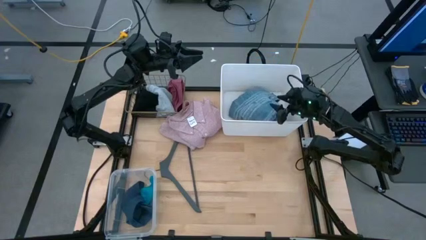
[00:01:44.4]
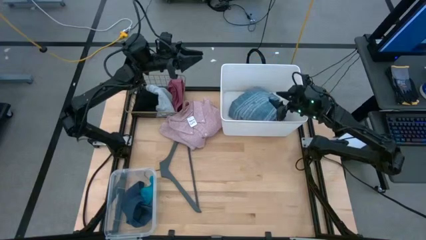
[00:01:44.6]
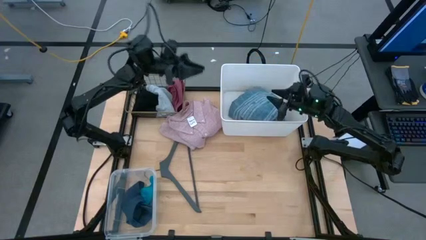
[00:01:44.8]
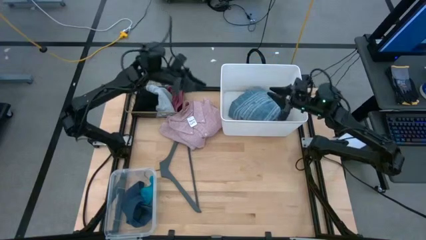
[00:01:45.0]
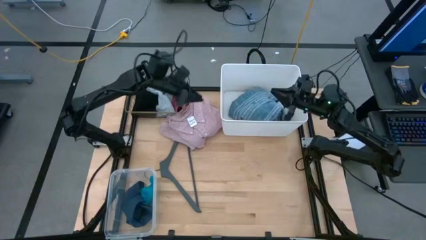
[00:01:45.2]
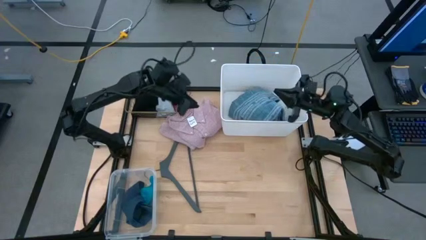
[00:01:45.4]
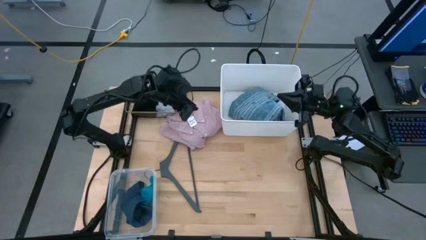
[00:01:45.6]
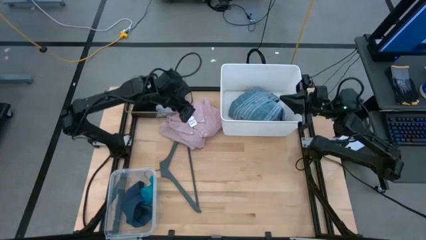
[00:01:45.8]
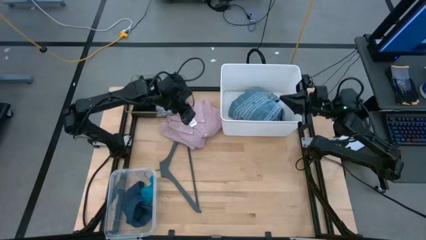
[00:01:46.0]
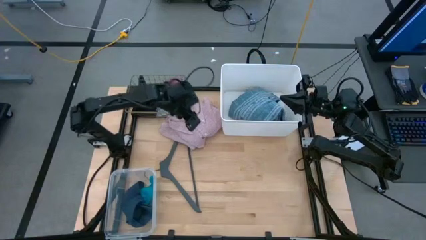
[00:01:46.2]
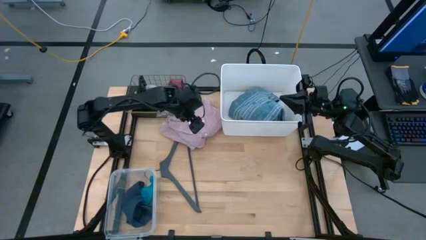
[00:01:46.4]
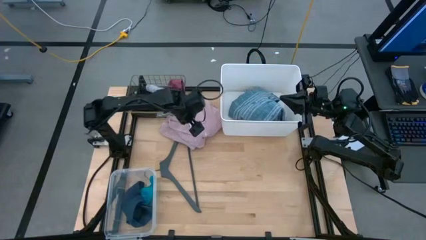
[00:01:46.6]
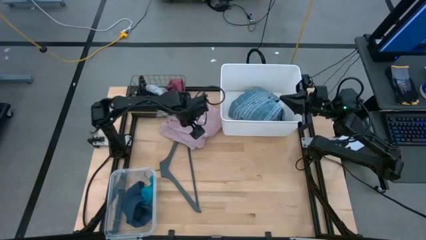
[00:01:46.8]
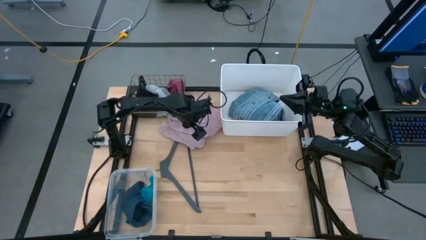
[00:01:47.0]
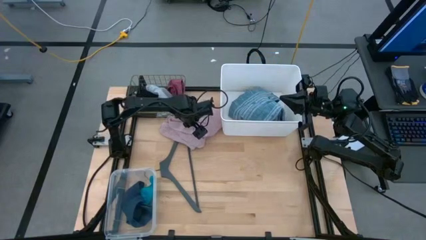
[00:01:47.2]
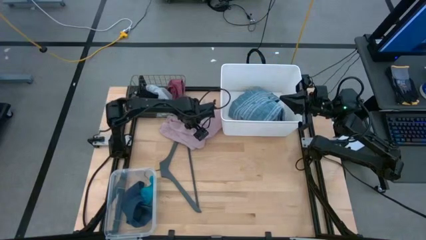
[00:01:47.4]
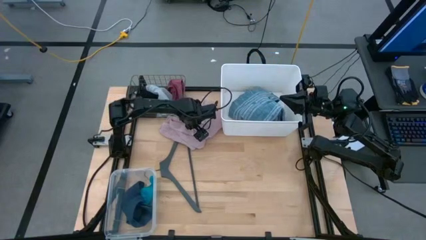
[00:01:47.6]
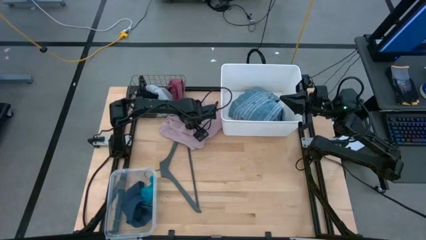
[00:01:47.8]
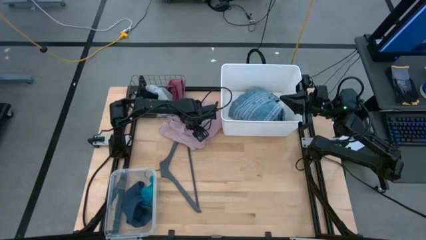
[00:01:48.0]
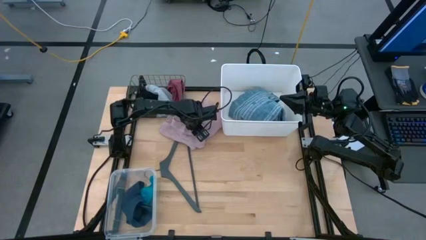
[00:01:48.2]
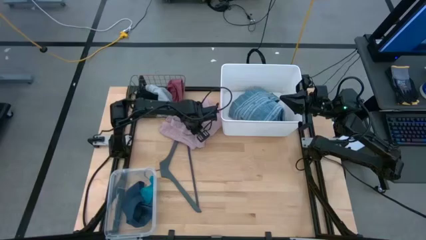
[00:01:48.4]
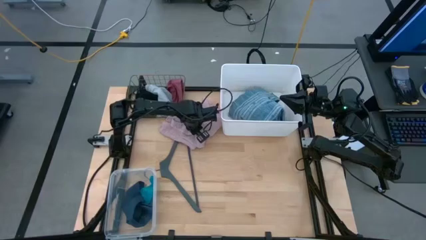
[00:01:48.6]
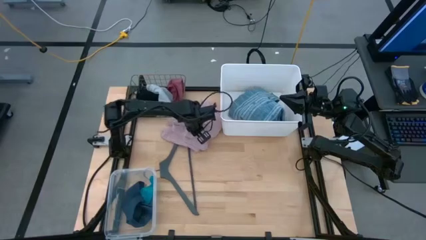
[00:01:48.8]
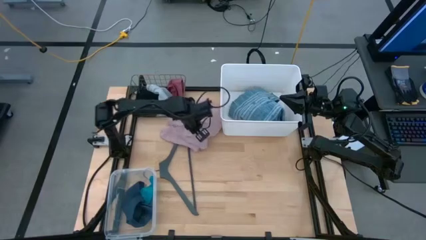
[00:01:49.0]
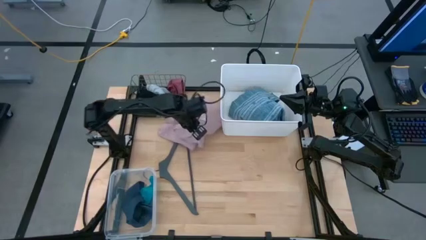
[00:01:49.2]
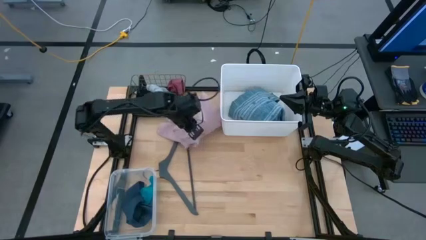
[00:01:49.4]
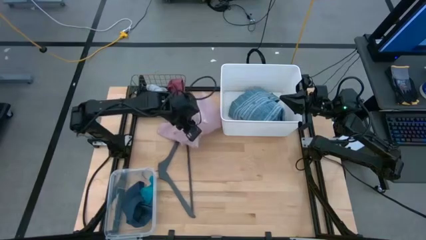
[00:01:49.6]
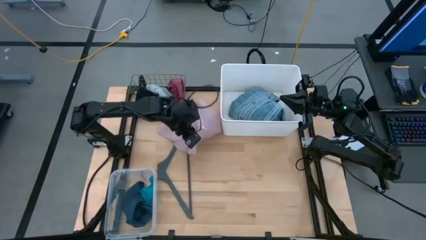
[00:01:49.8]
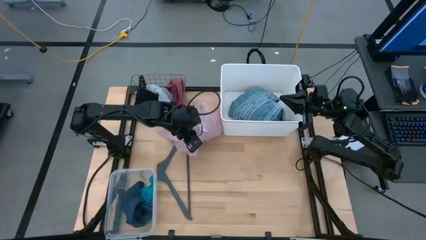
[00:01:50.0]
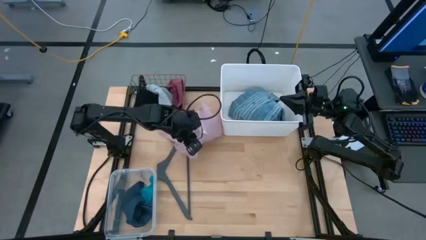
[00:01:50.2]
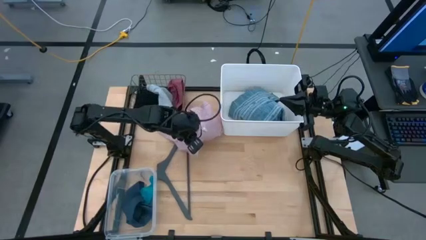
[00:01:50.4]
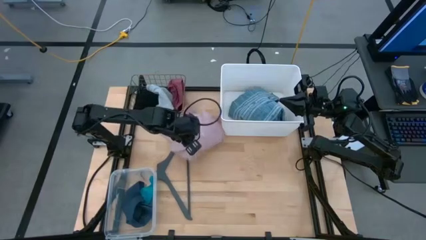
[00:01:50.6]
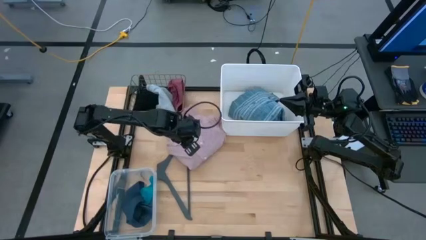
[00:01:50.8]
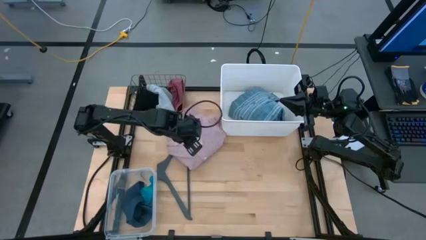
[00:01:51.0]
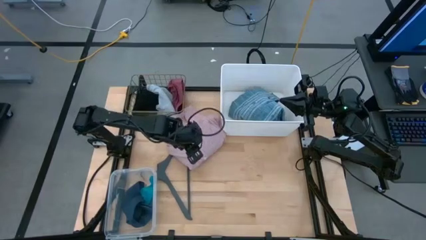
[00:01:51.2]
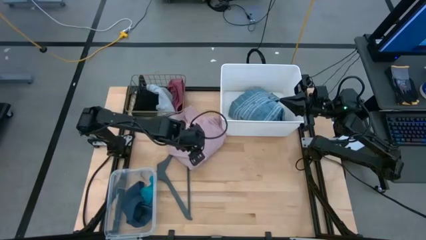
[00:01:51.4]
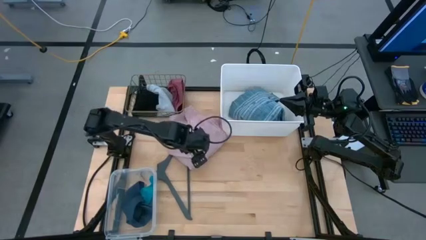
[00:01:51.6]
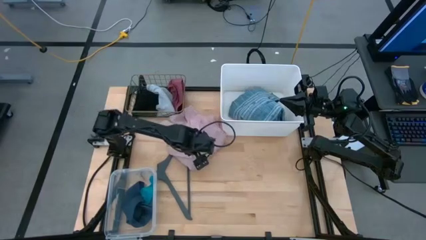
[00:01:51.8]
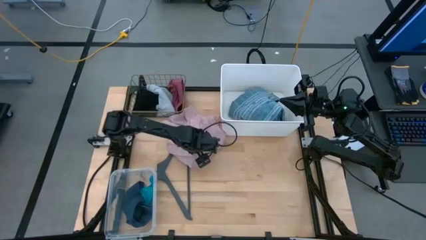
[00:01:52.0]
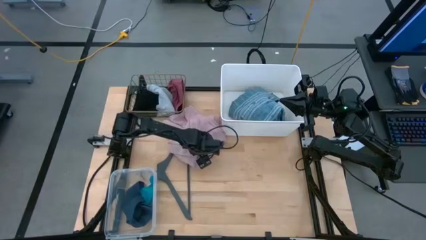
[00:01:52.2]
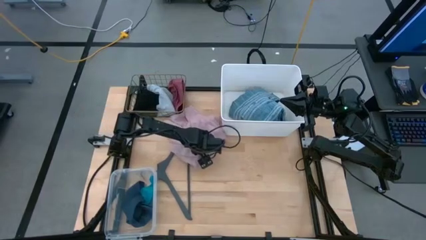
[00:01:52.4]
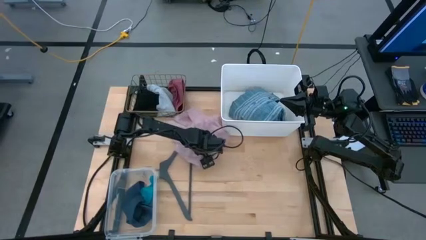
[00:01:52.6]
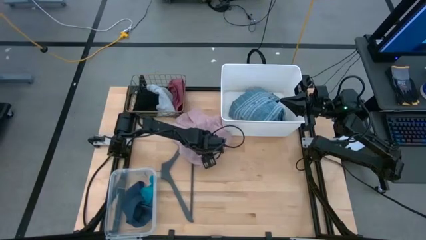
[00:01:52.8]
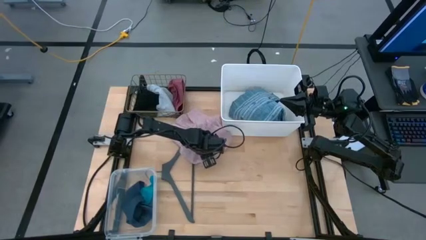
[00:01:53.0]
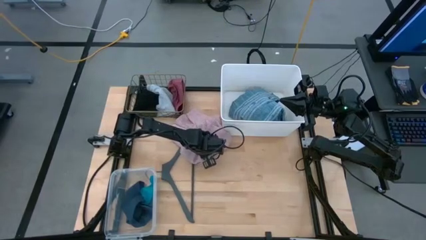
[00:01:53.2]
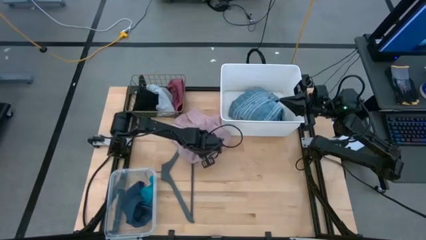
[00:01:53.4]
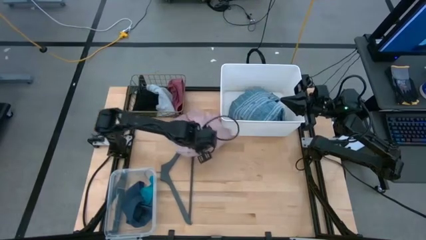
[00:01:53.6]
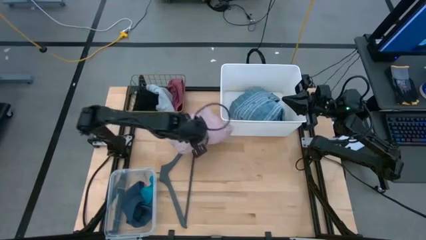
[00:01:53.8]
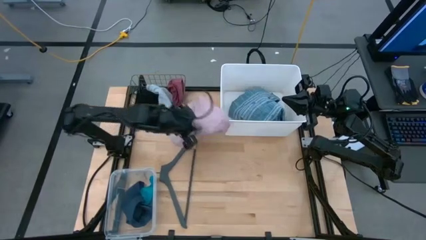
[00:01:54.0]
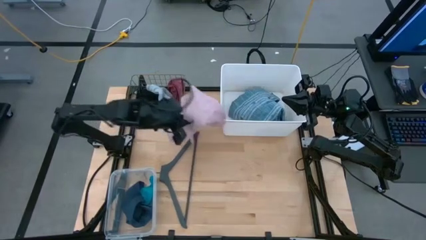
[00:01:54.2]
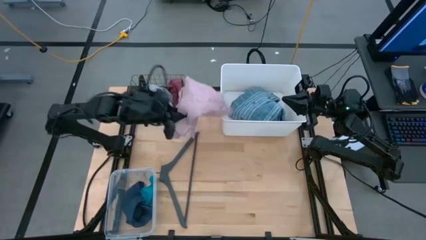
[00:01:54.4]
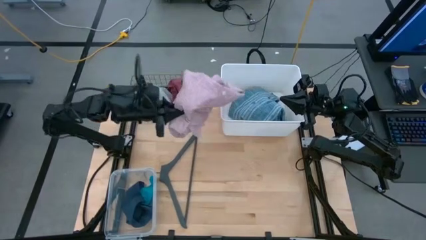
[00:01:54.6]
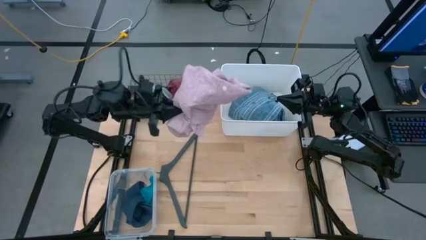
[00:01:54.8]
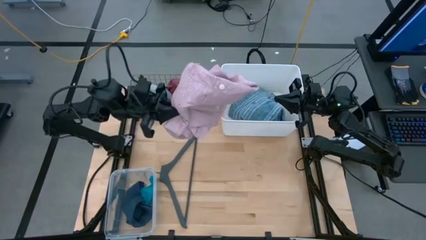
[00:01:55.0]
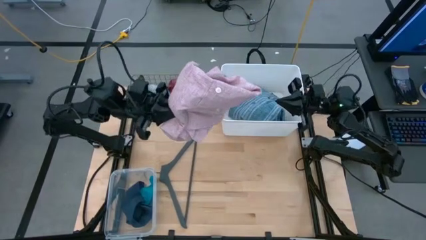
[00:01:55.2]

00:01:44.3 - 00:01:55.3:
Task: Pick & Place Cloths
Put the pink shirt into the white bin
